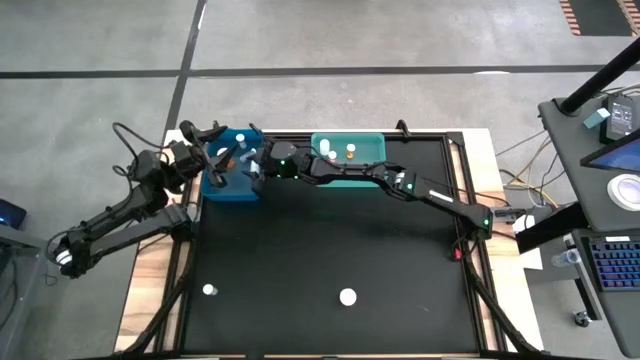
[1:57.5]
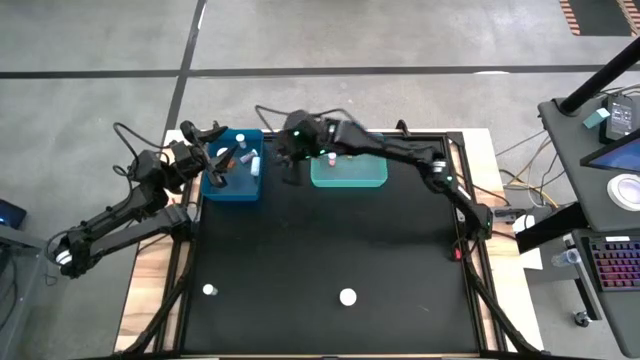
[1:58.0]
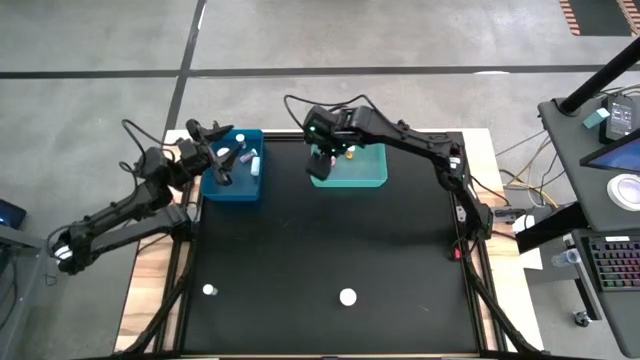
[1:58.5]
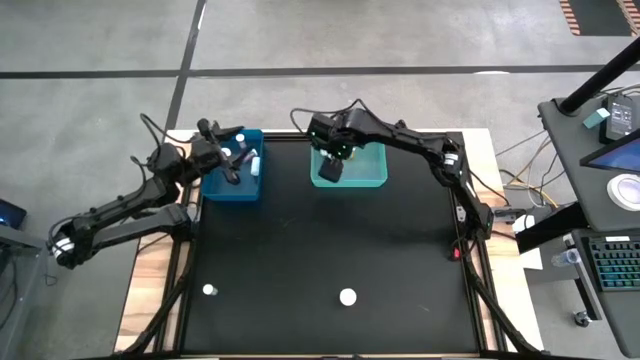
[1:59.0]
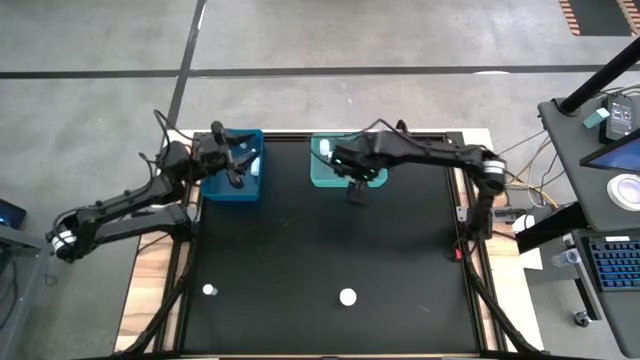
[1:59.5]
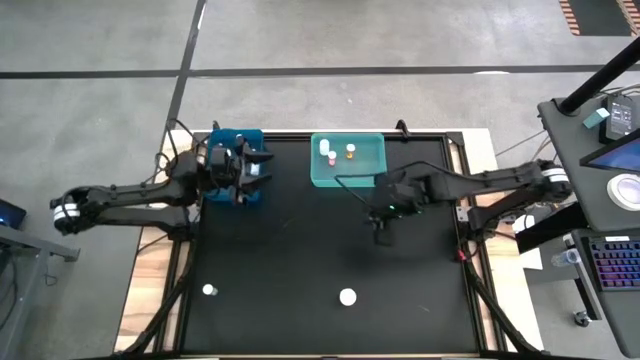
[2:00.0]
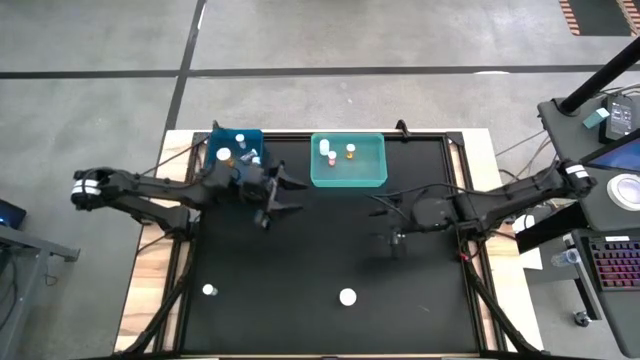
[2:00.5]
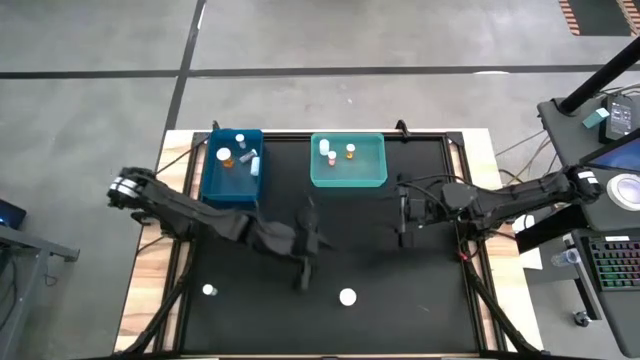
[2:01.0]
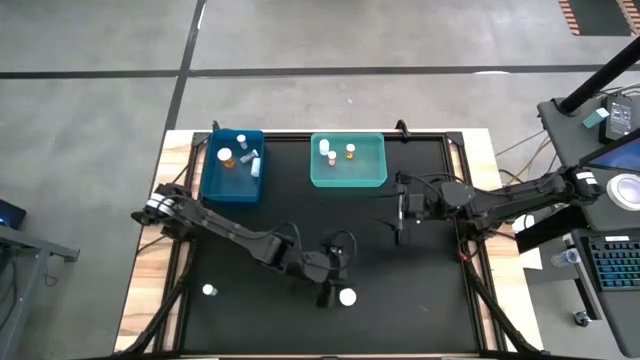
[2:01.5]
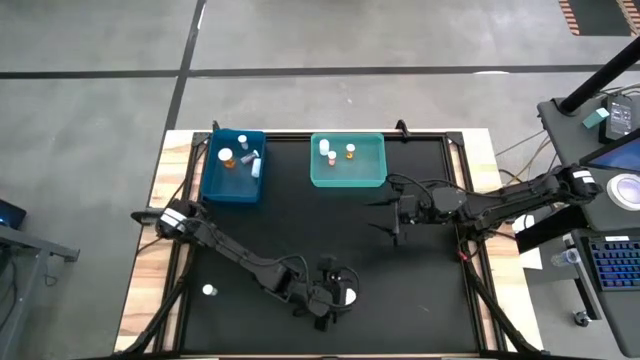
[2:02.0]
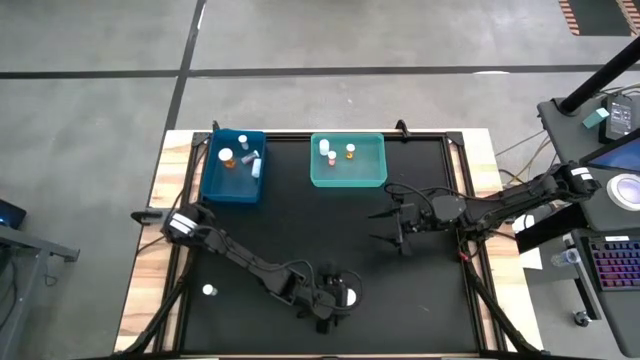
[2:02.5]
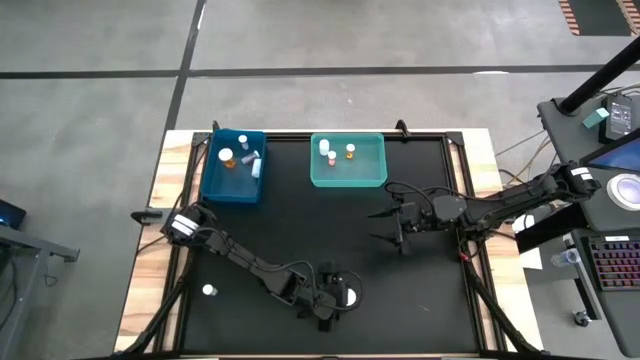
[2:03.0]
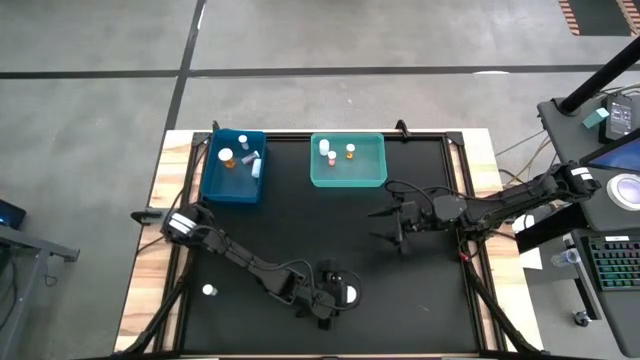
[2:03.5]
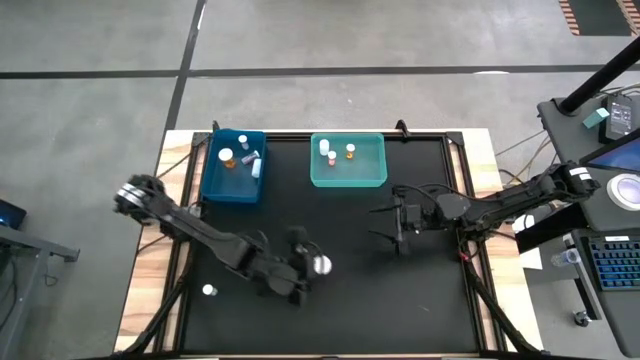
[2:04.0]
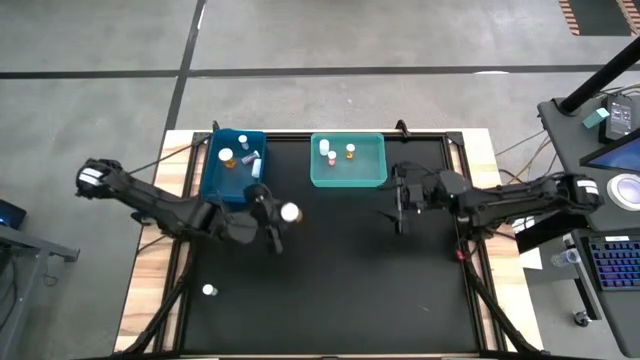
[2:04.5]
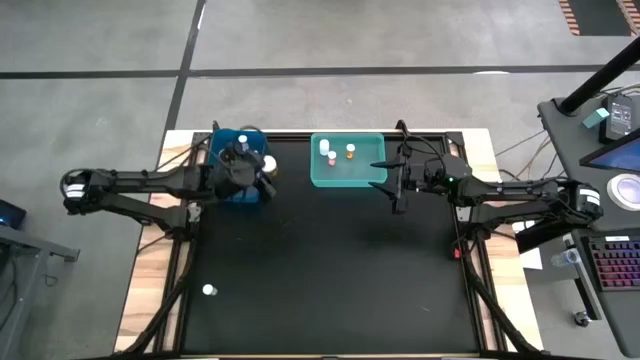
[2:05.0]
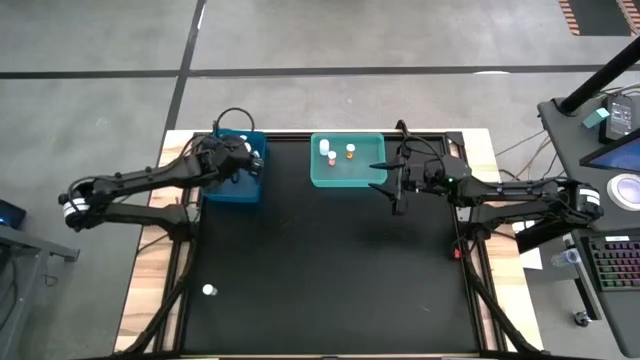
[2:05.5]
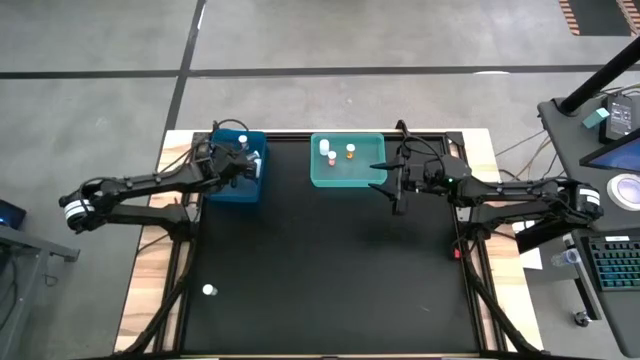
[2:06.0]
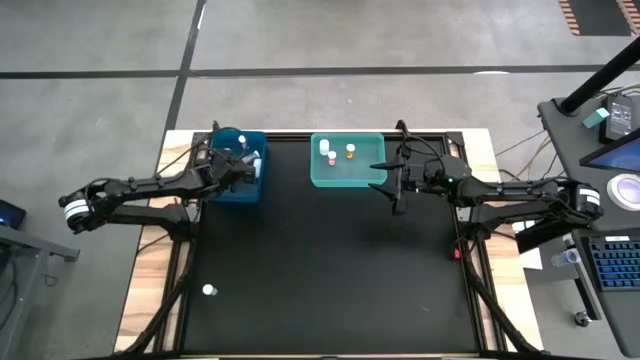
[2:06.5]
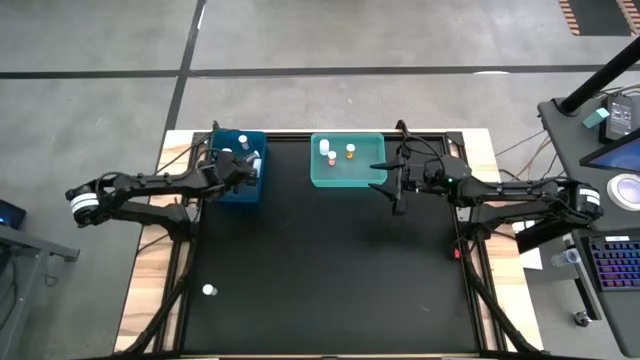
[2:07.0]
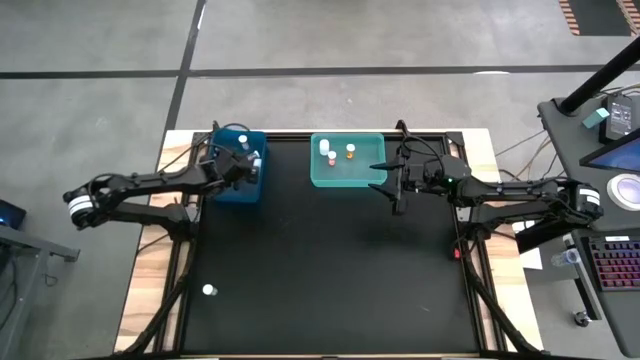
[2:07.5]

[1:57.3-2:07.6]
Task: Pick and place medicine bottles into bin by pill shape (circle, oval)
Put the orange capsule bottle into the blue bin

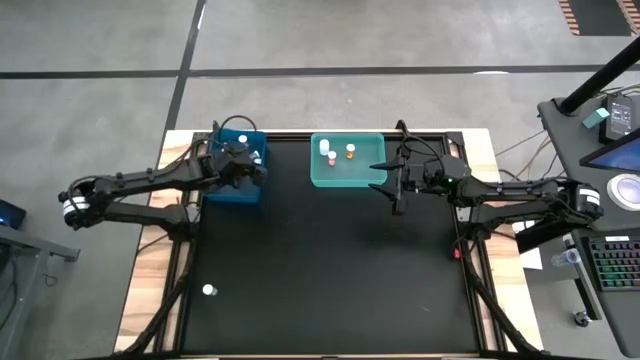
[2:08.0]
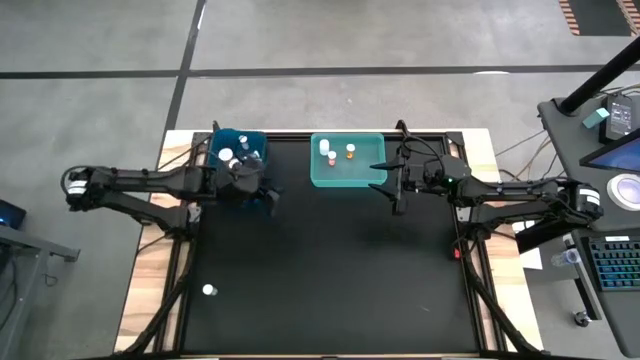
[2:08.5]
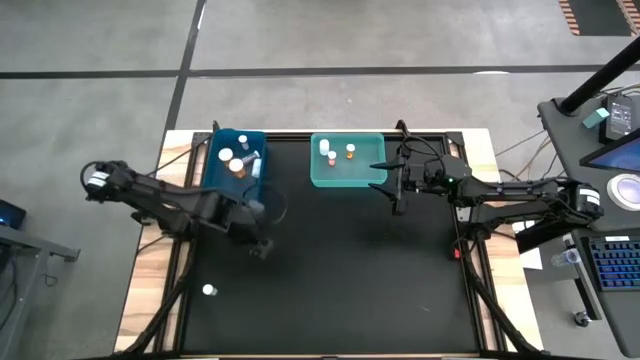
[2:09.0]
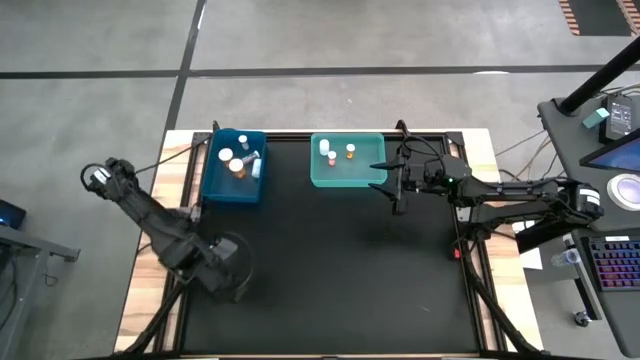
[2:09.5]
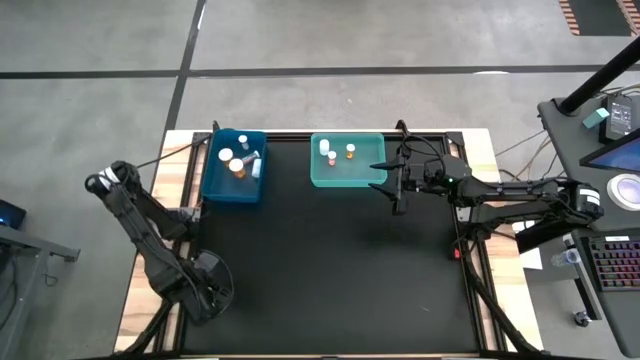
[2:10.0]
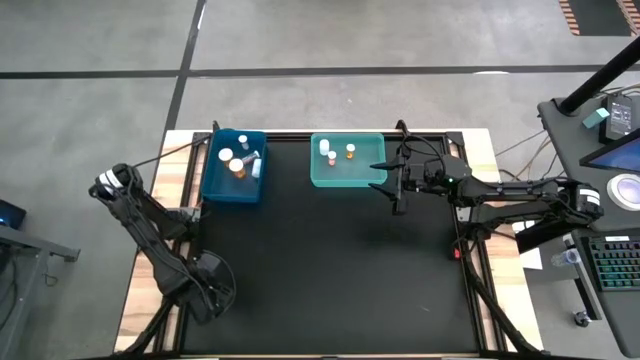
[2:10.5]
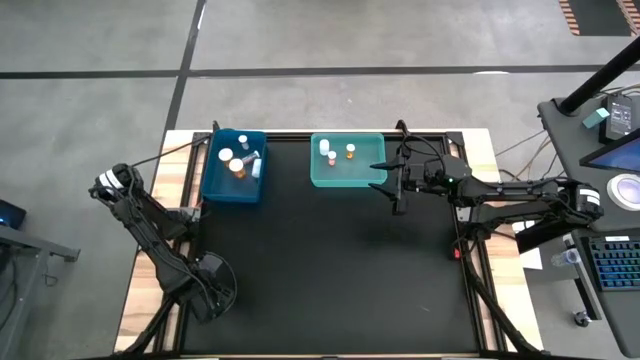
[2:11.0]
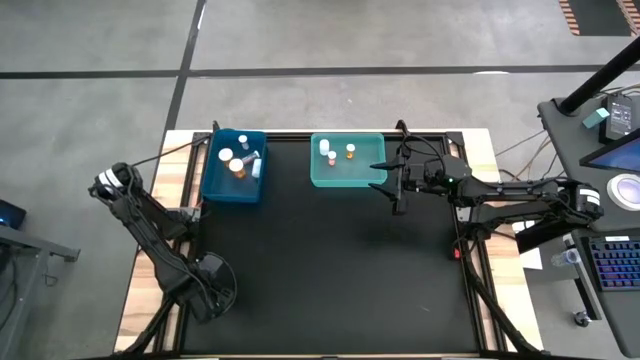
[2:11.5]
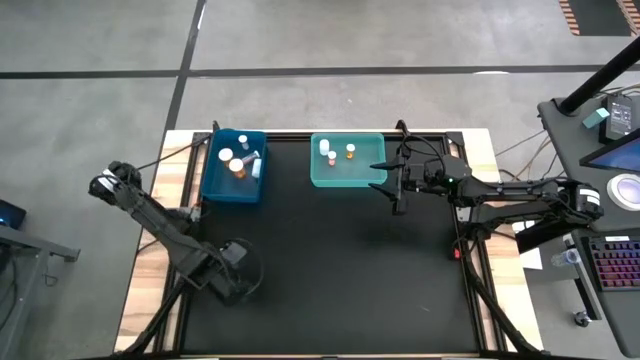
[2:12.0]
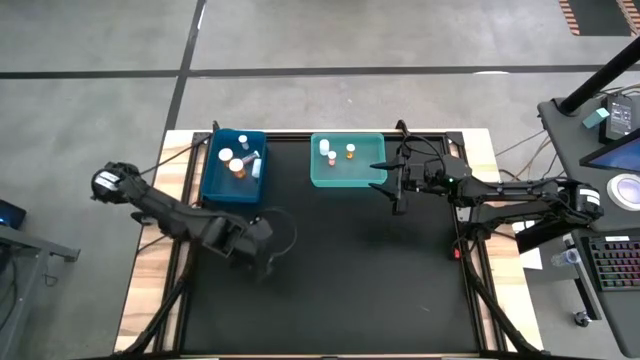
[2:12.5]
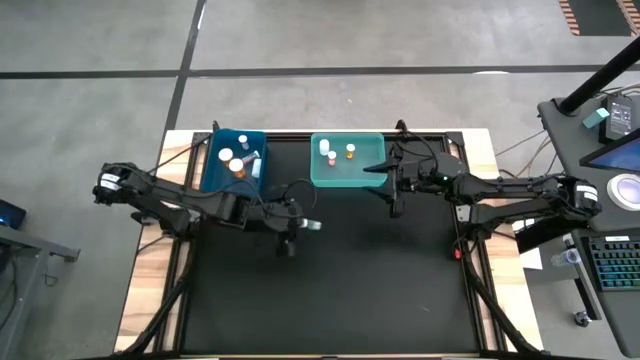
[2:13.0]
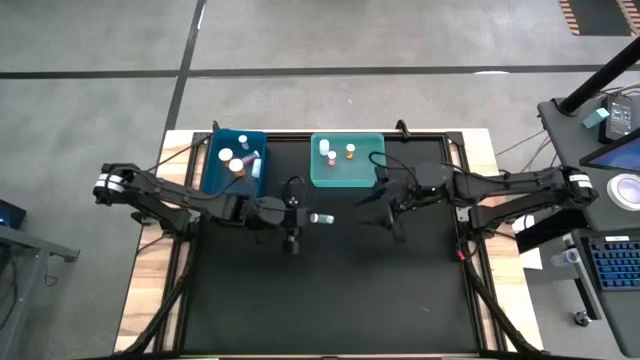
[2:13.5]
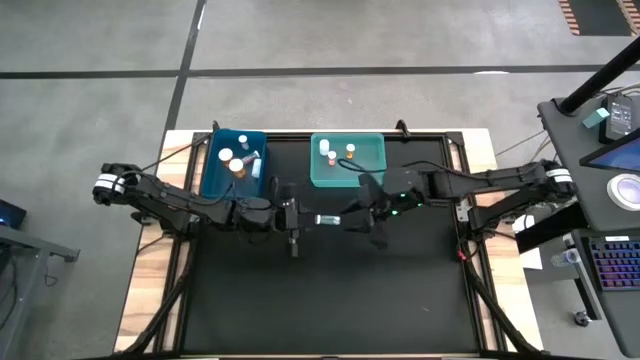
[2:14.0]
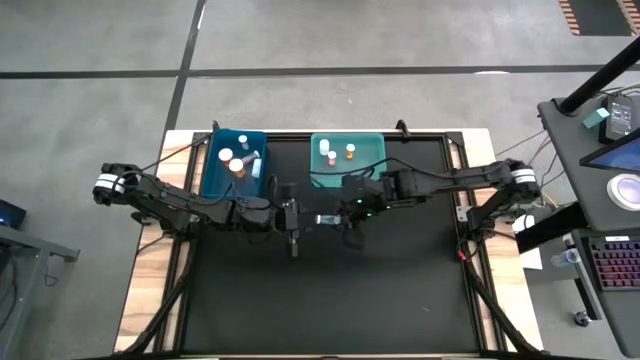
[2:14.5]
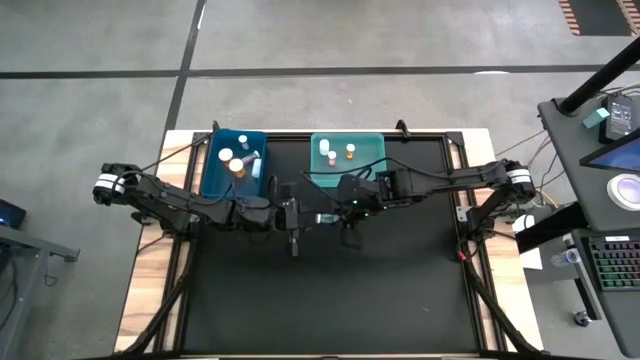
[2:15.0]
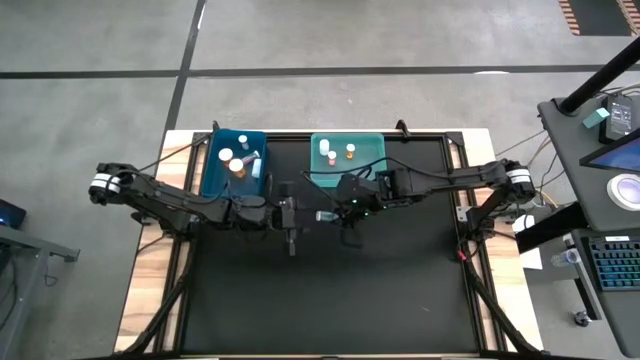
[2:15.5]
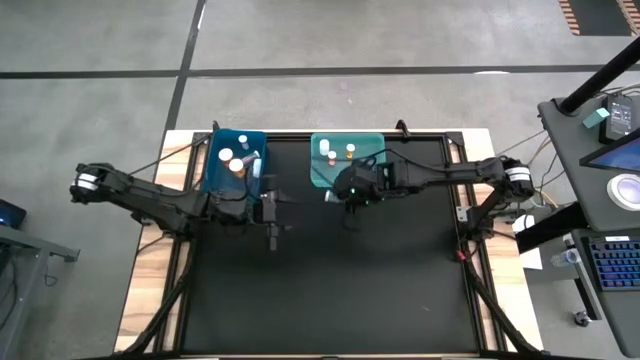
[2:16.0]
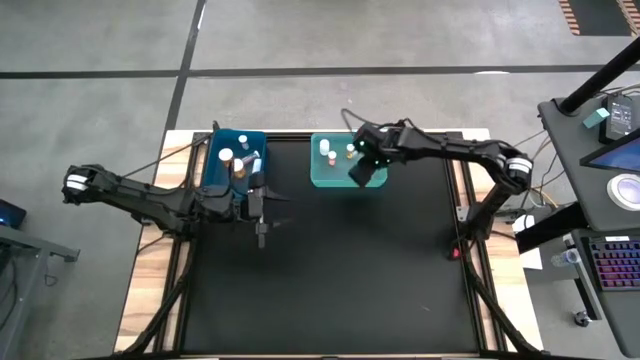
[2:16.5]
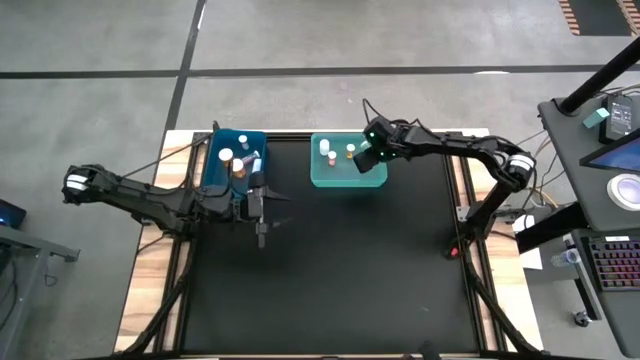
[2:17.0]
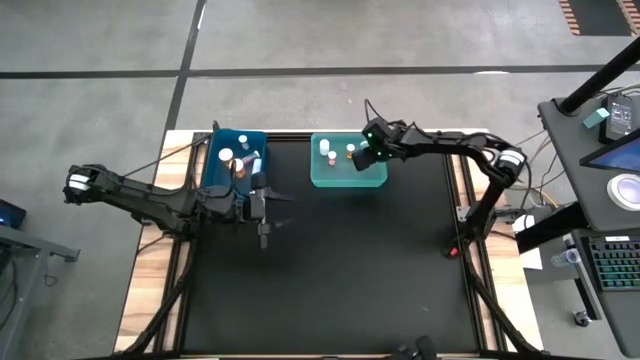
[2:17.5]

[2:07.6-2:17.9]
Put the blue tablet bottle into the light blue bin
